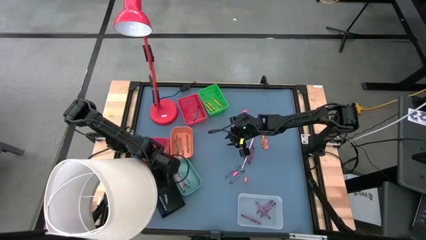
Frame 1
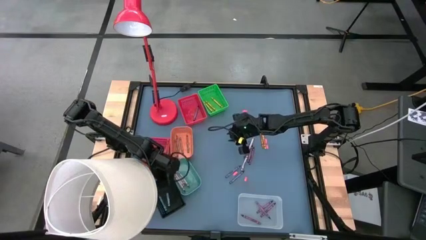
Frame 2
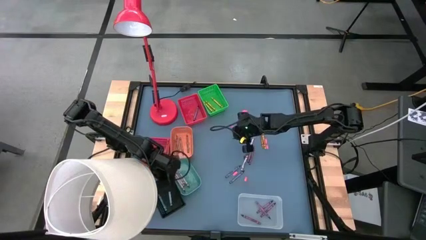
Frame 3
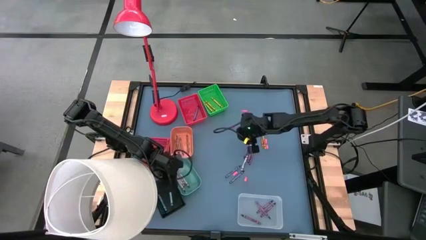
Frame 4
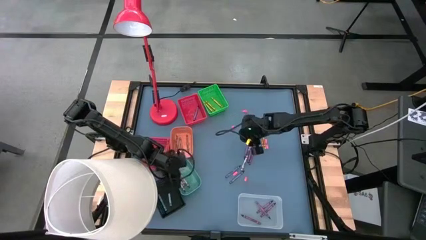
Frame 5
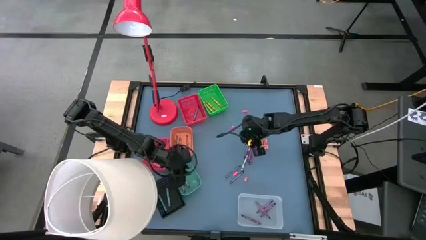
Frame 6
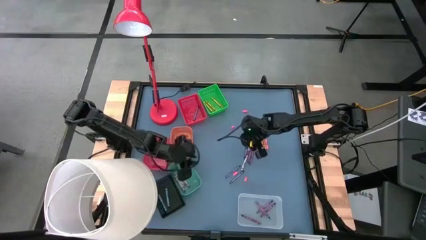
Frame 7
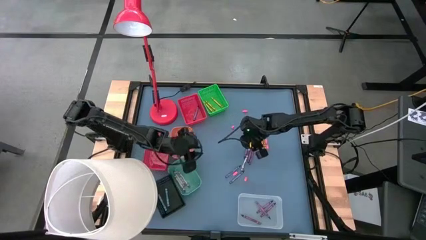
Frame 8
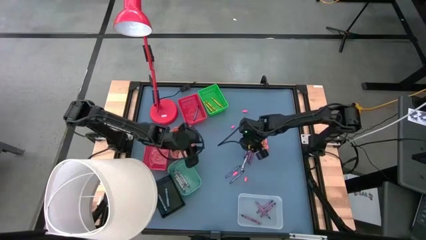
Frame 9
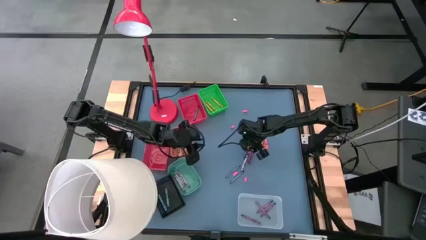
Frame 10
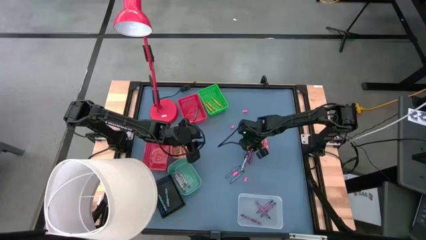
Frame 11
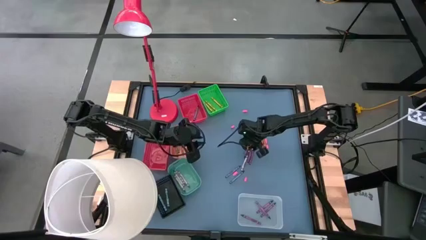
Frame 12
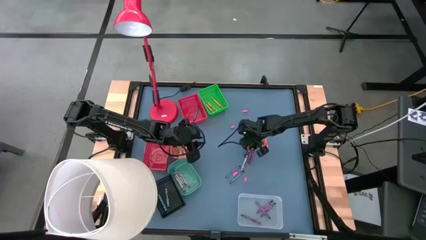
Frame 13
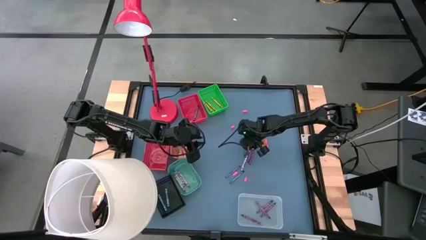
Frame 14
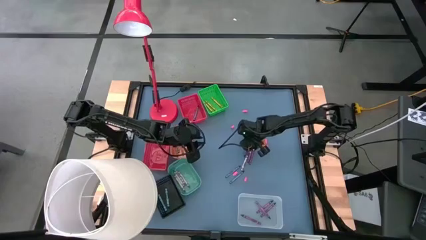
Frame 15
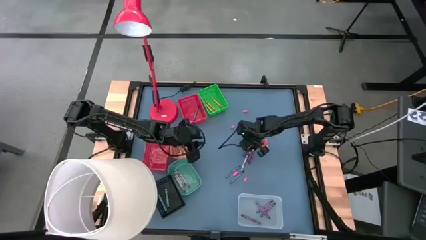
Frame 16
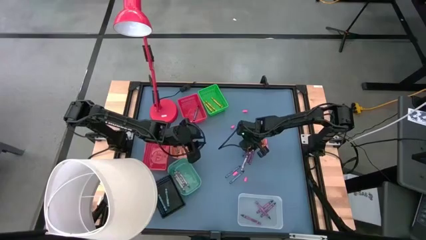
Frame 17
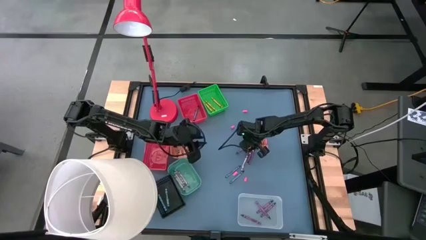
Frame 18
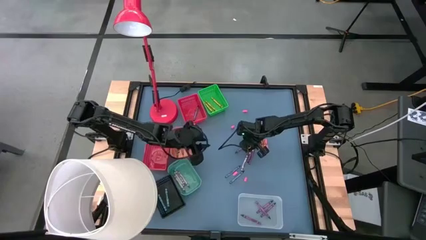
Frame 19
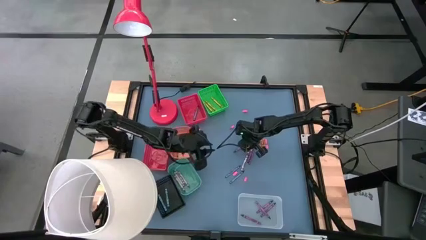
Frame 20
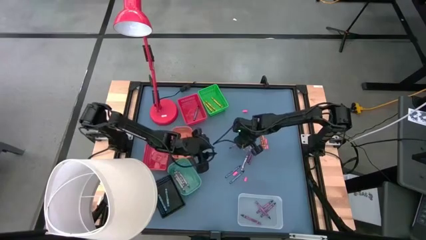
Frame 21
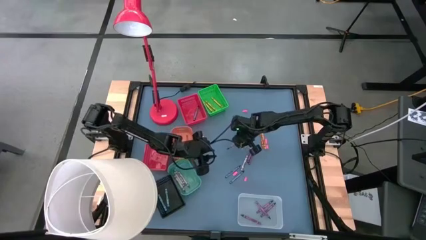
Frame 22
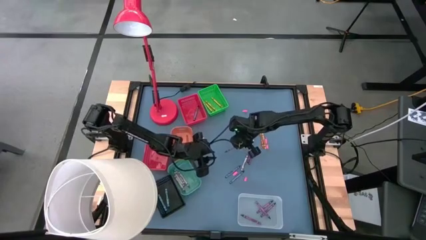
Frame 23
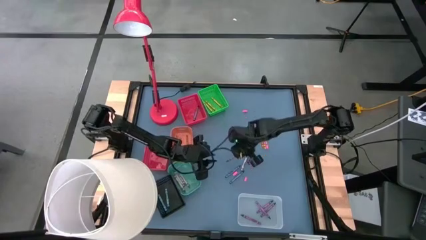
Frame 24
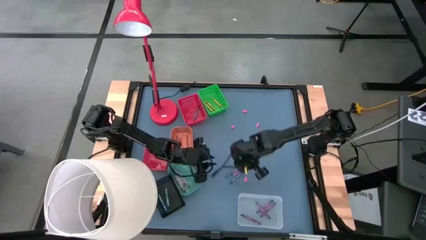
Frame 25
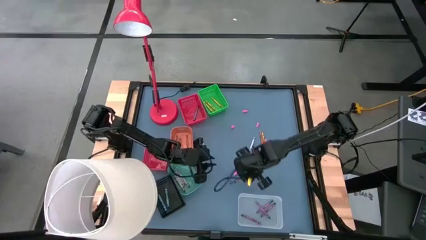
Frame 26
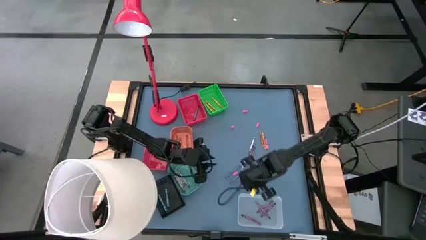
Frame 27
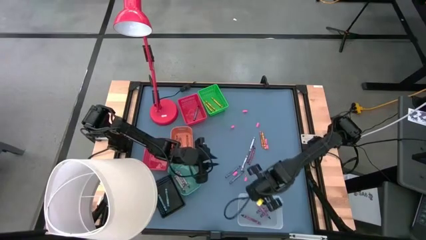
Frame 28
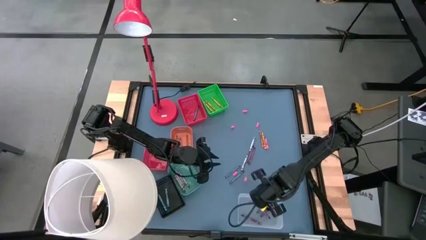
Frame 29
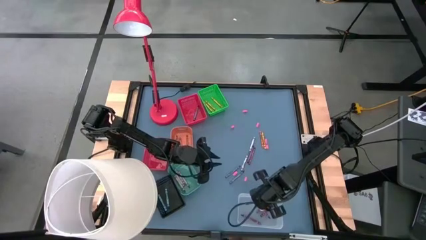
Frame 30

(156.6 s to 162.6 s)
Task: Sort crayons
Put the purple crayon into the white bin

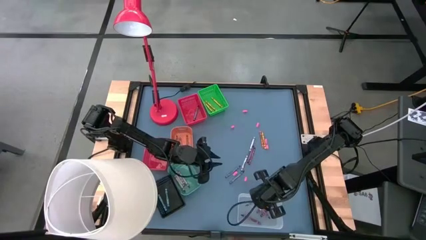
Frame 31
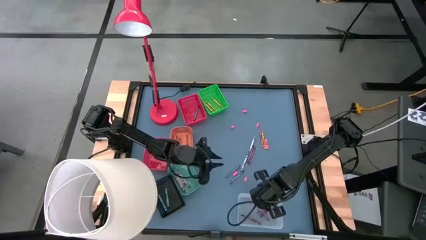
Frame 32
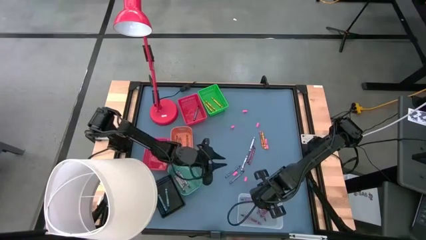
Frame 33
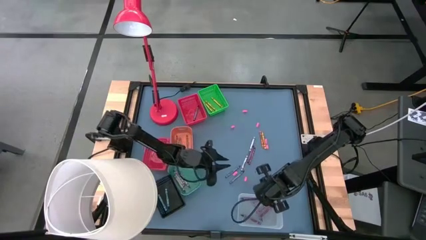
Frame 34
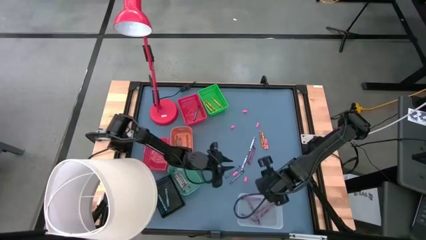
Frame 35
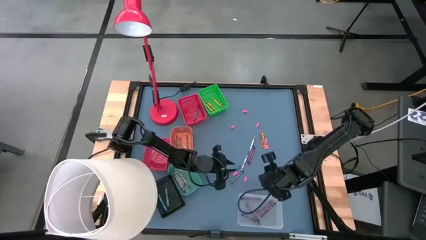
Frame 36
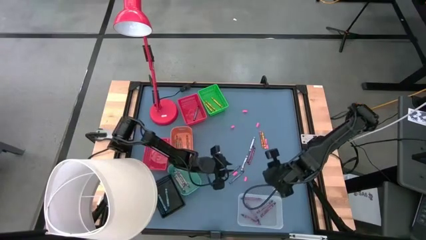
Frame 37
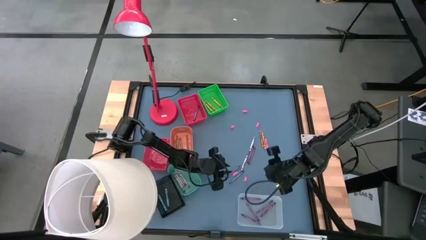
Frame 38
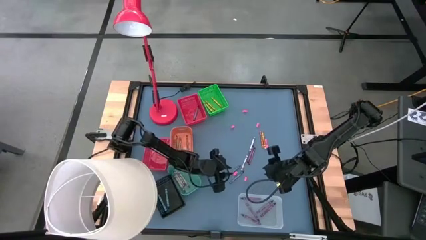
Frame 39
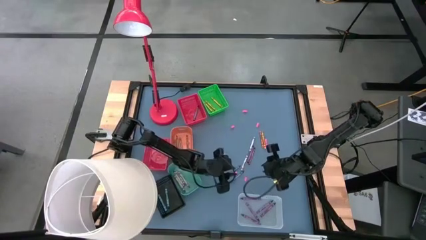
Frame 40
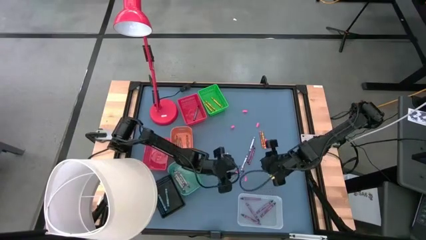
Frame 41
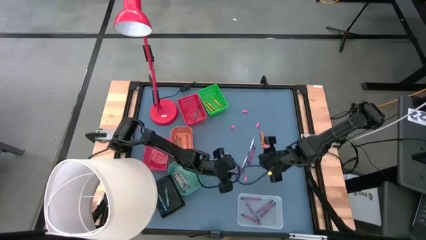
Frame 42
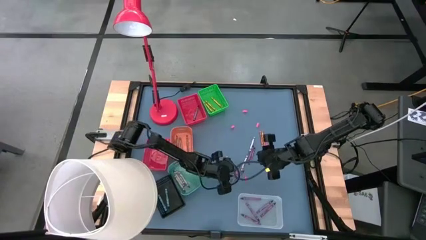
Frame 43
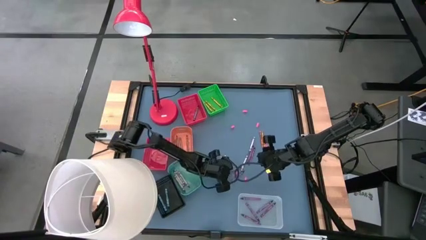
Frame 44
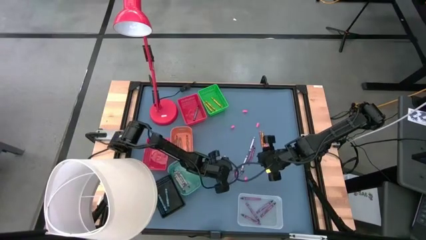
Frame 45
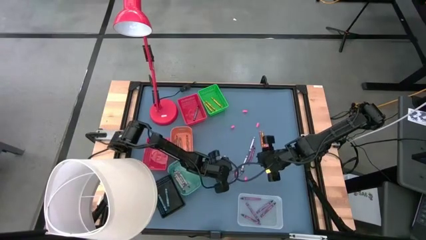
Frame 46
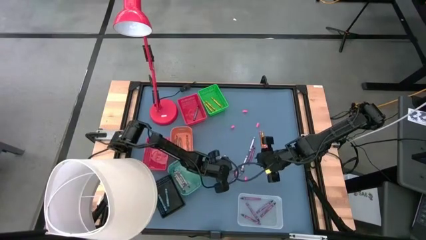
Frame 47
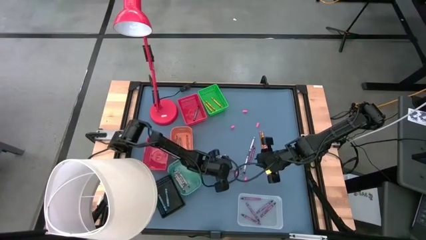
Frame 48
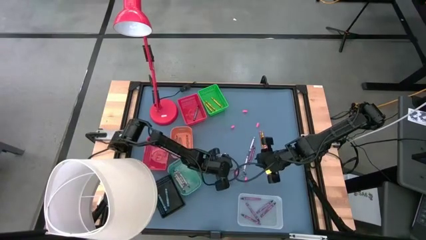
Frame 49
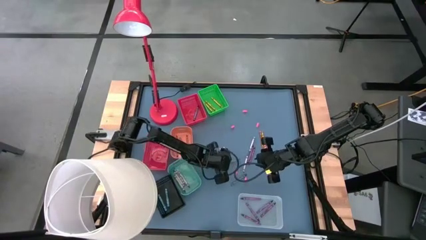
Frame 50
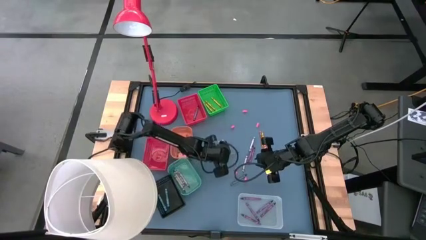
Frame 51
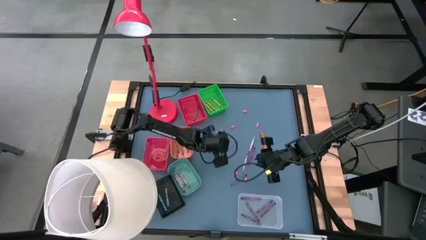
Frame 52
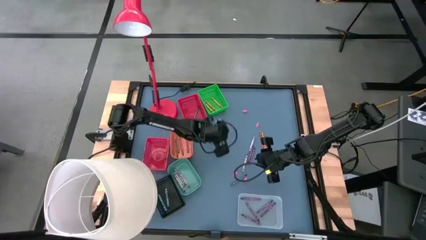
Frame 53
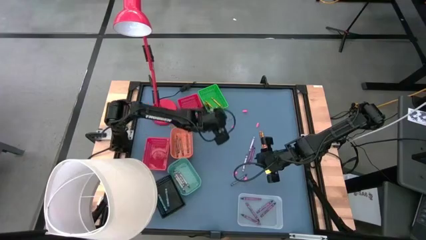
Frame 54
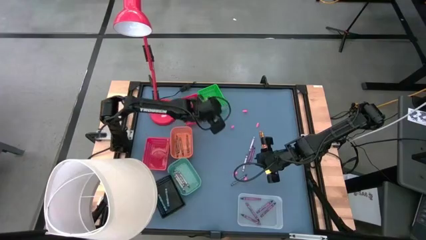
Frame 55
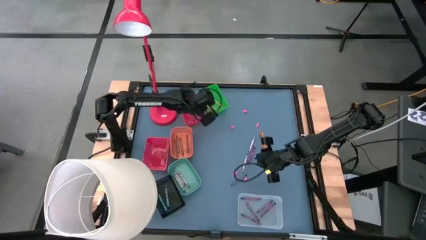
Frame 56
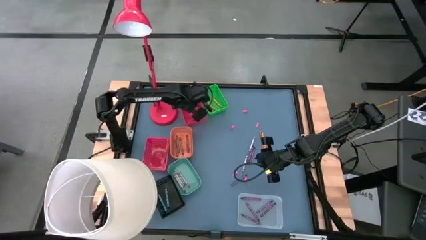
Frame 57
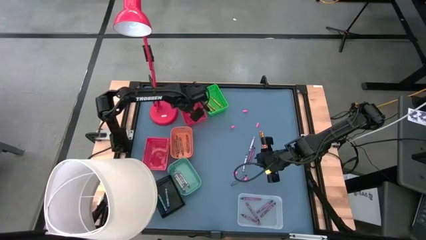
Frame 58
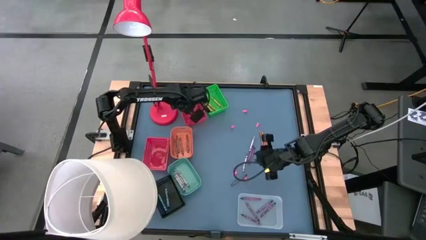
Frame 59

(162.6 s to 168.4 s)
Put the blue crayon into the right red basket

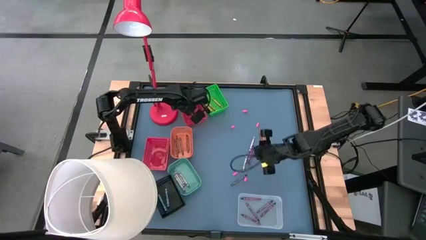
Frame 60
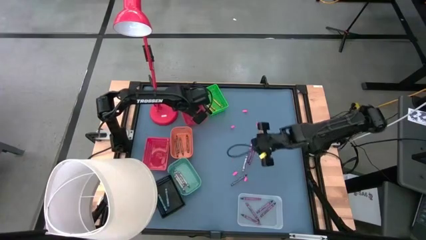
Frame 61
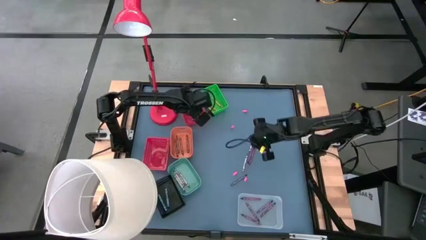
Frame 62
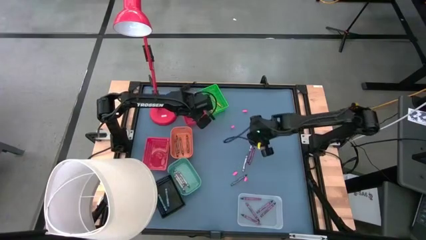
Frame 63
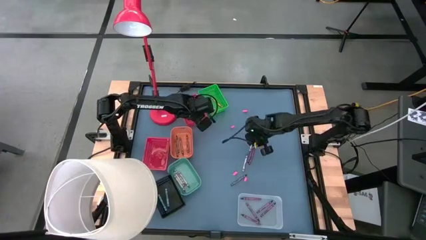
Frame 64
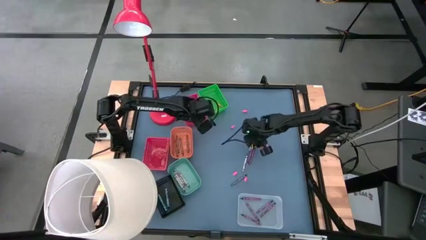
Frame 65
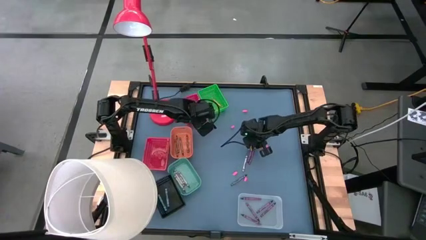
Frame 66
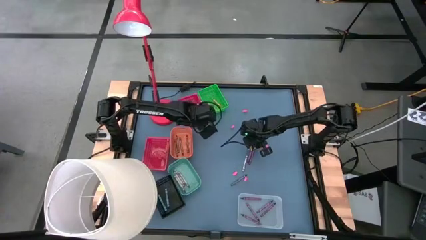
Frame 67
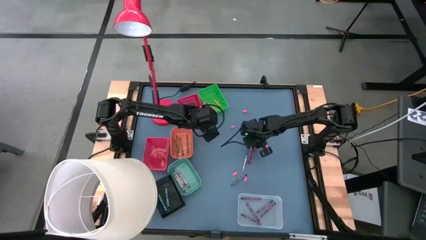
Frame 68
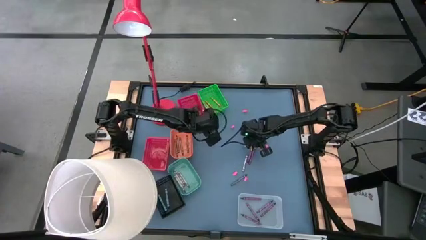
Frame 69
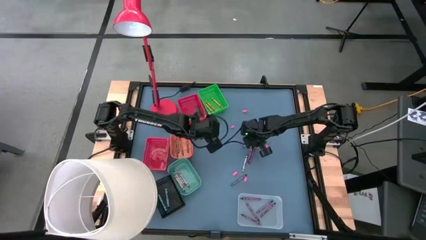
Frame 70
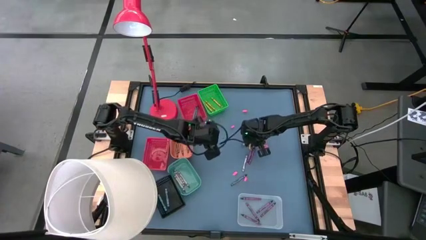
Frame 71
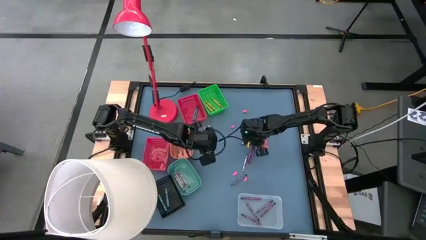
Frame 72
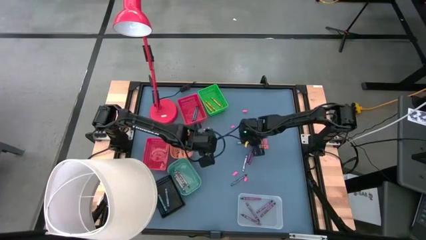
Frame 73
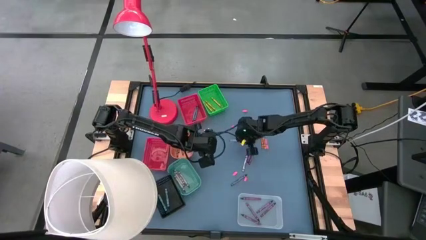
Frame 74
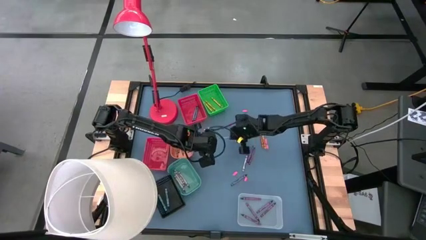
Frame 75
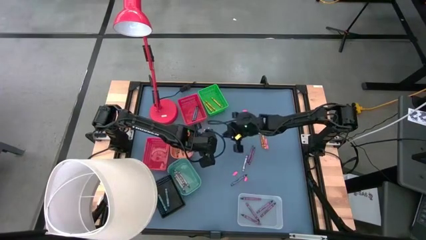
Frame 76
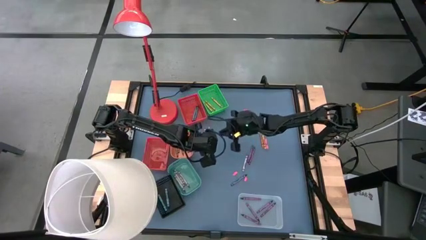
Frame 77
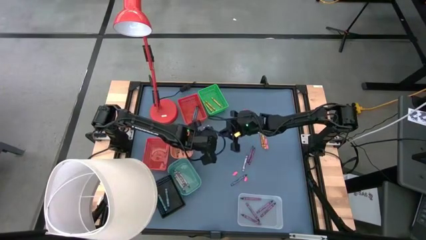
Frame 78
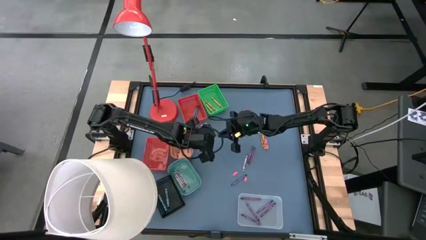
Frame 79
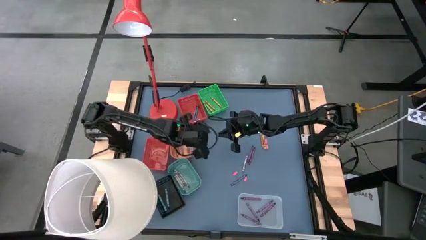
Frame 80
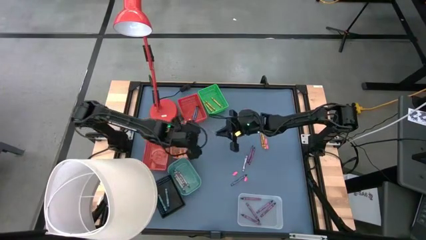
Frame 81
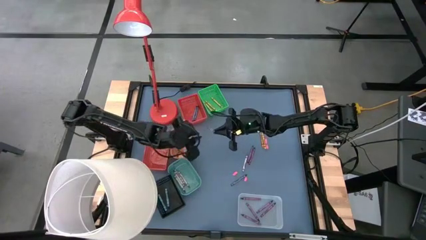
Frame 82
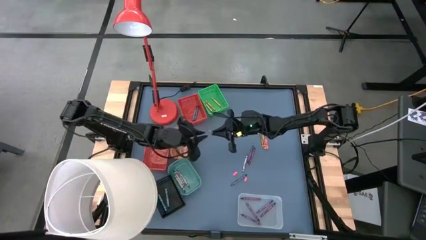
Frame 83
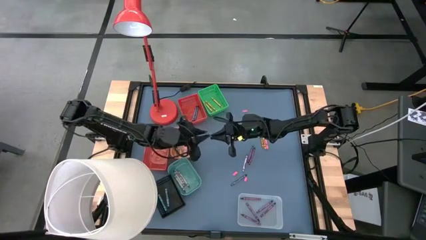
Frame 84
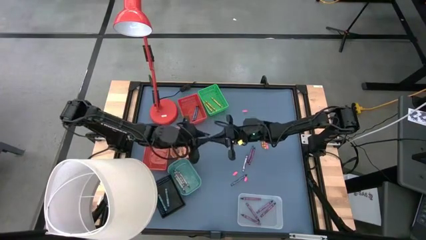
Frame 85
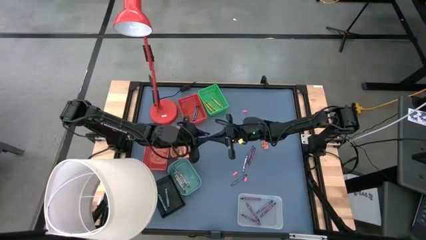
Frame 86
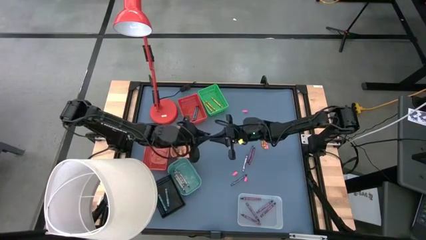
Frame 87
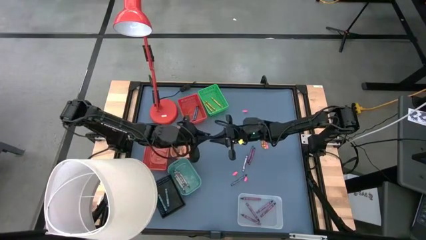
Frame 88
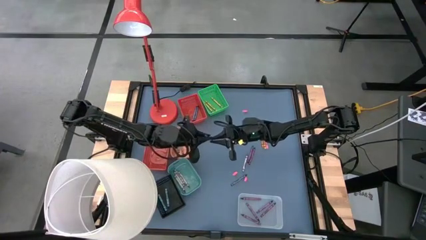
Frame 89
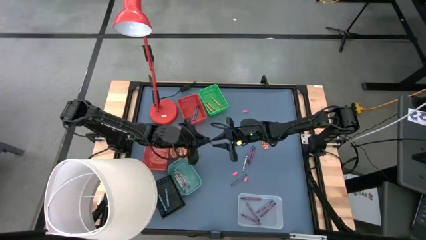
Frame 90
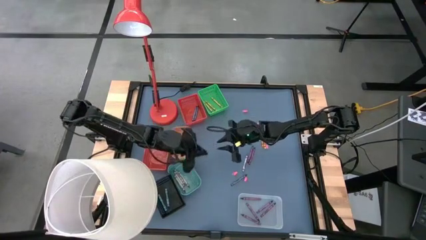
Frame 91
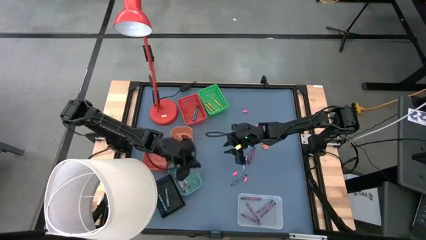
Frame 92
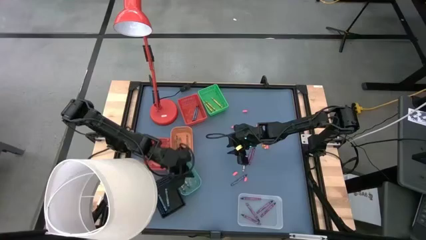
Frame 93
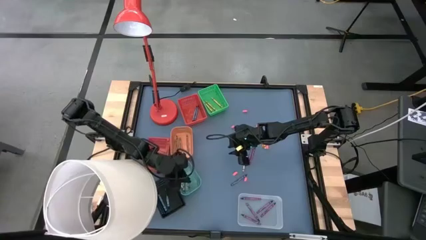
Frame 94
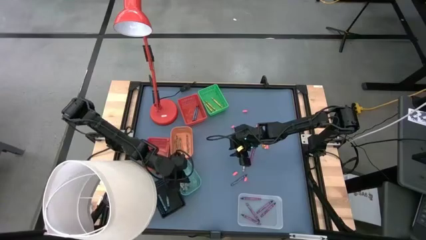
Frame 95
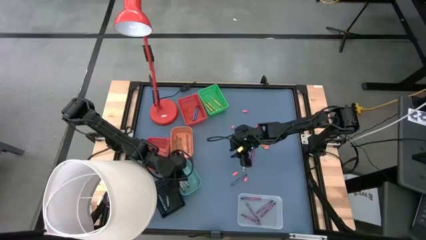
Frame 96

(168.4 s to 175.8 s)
Put the gray crayon into the light green bin
